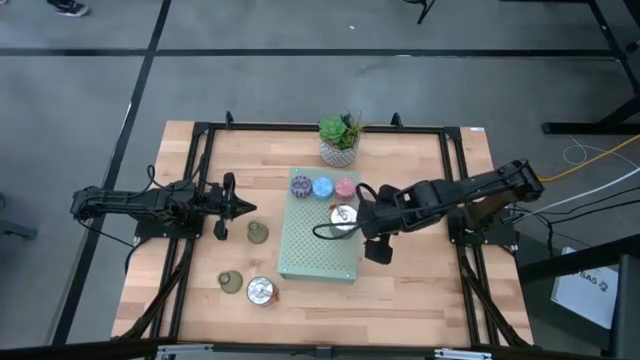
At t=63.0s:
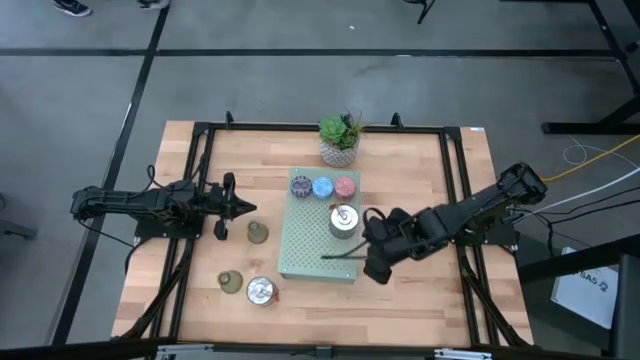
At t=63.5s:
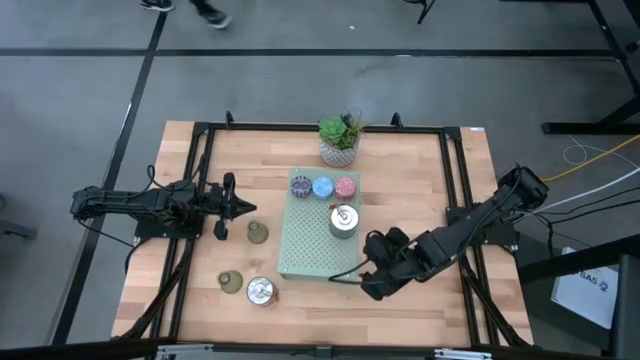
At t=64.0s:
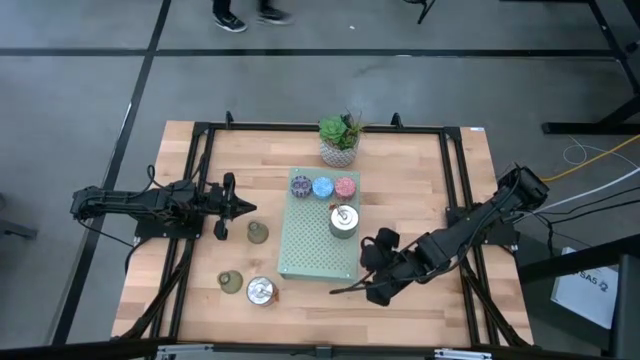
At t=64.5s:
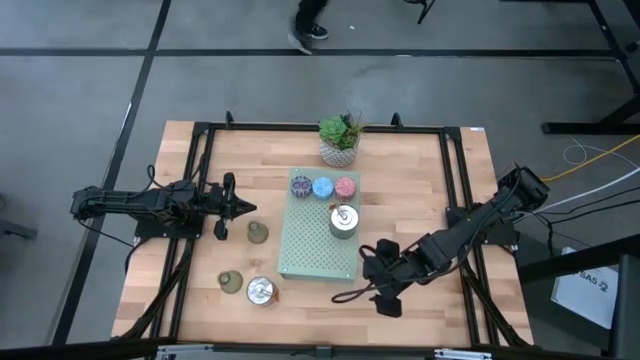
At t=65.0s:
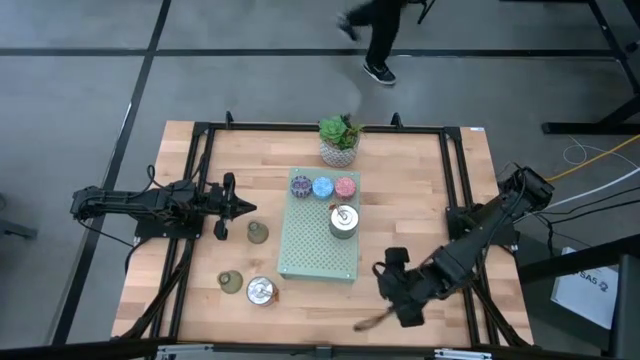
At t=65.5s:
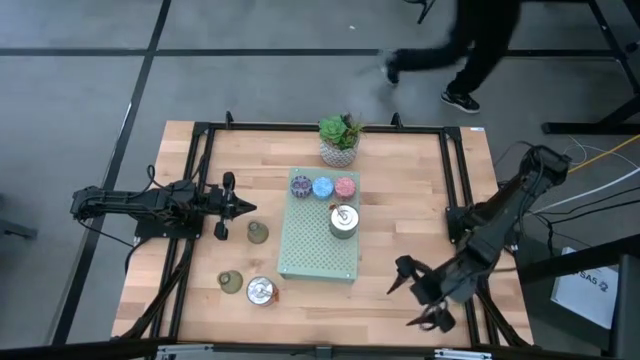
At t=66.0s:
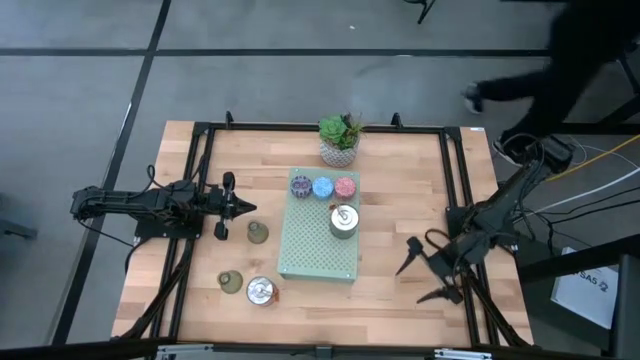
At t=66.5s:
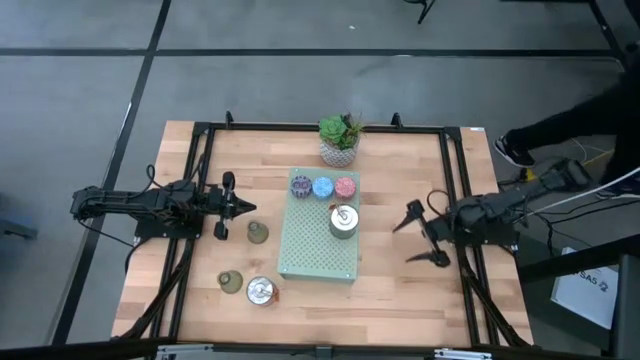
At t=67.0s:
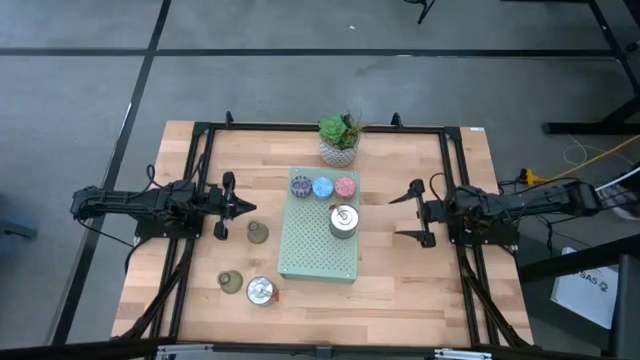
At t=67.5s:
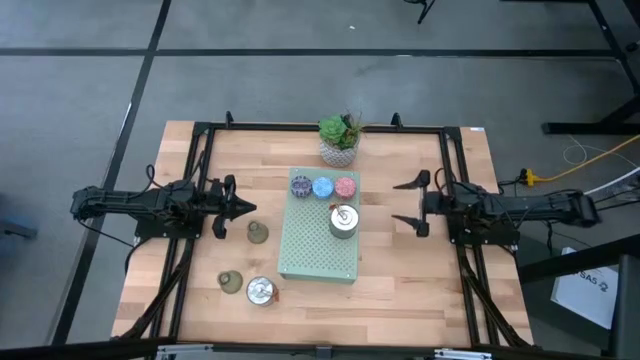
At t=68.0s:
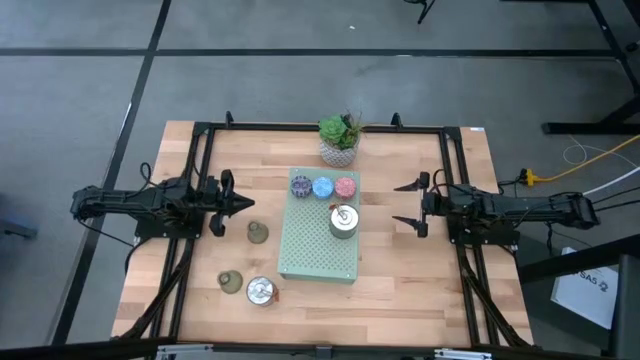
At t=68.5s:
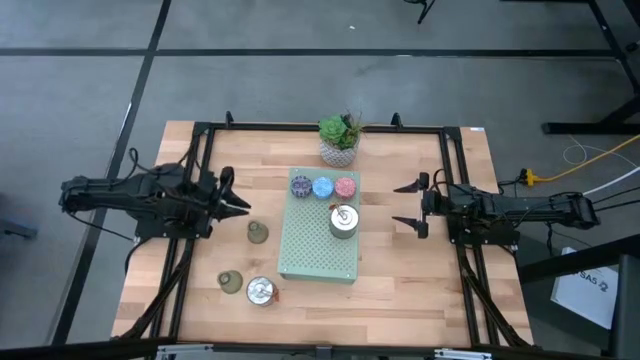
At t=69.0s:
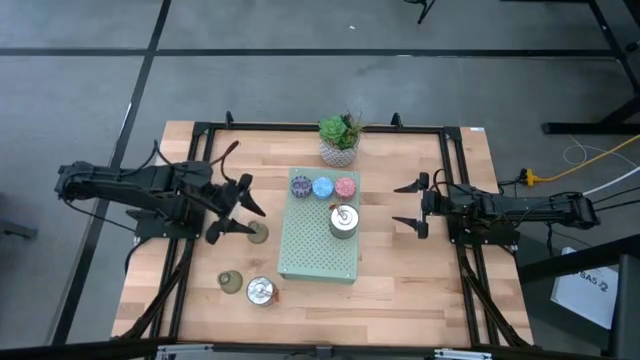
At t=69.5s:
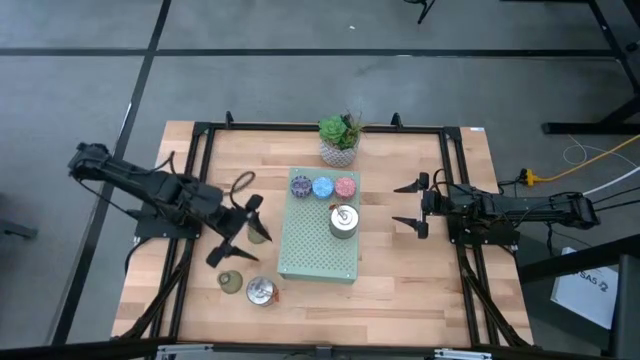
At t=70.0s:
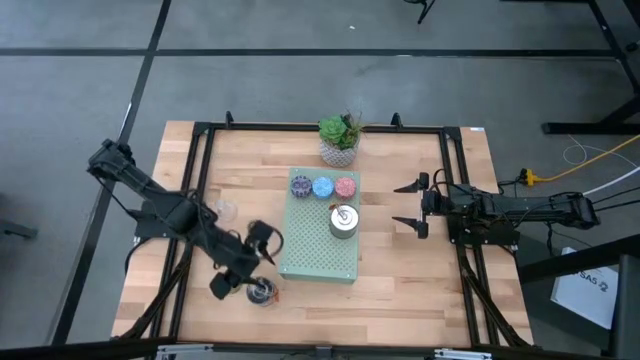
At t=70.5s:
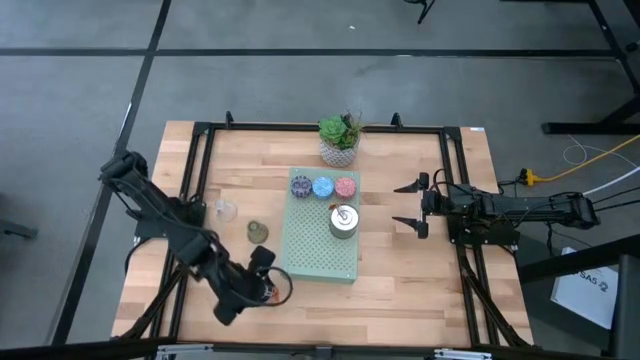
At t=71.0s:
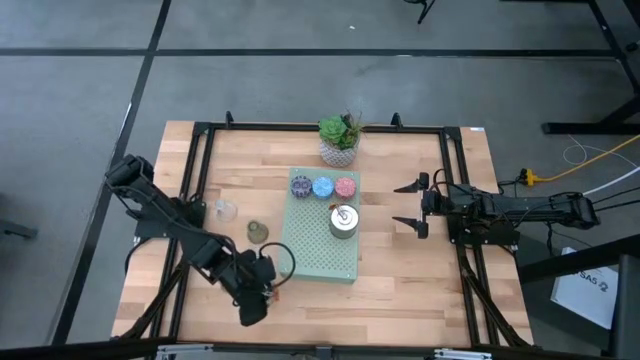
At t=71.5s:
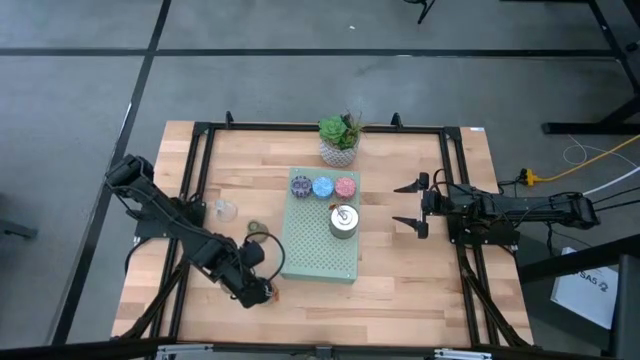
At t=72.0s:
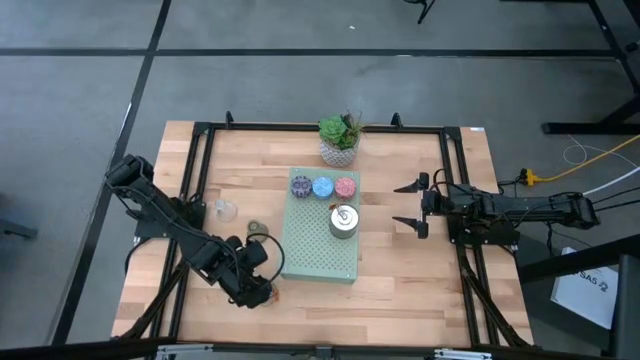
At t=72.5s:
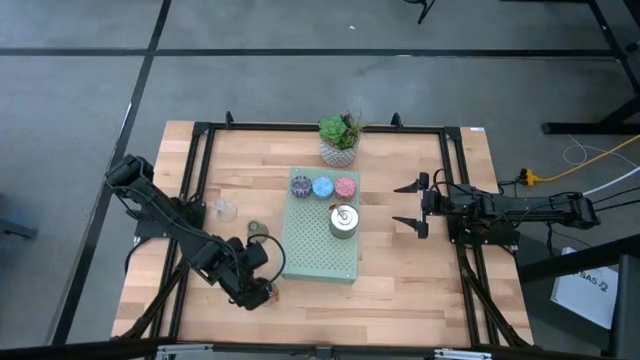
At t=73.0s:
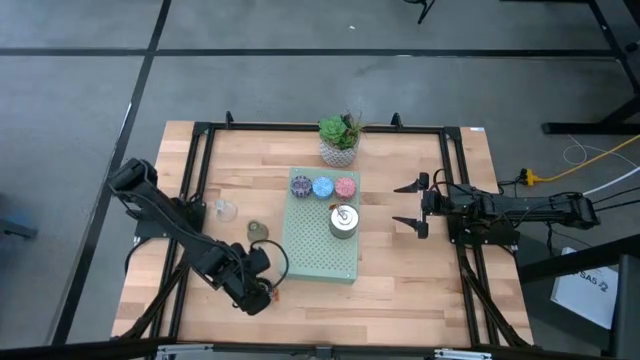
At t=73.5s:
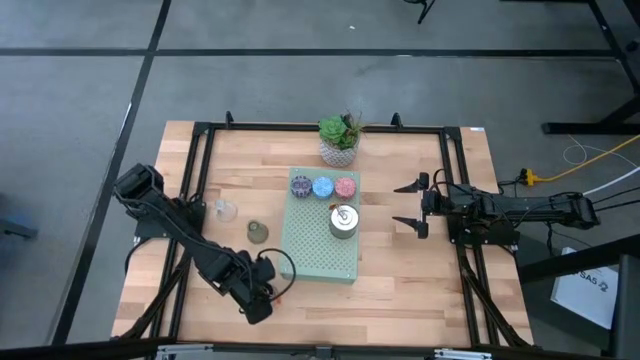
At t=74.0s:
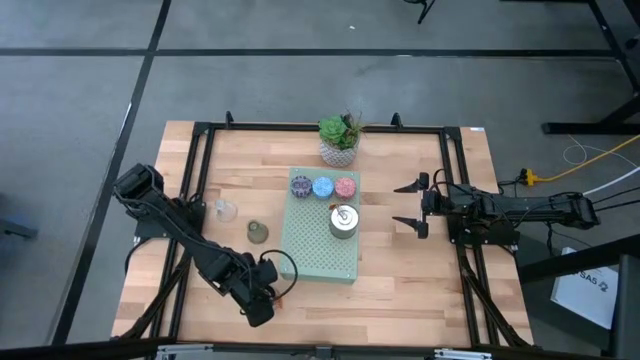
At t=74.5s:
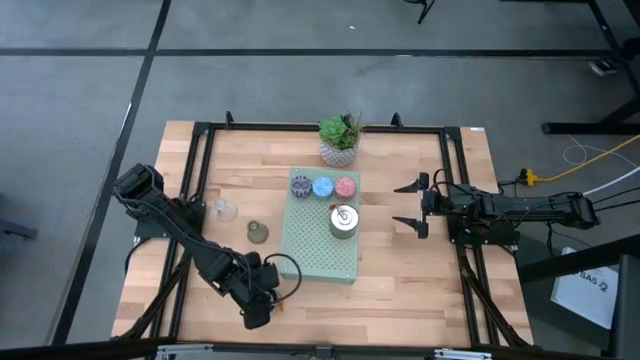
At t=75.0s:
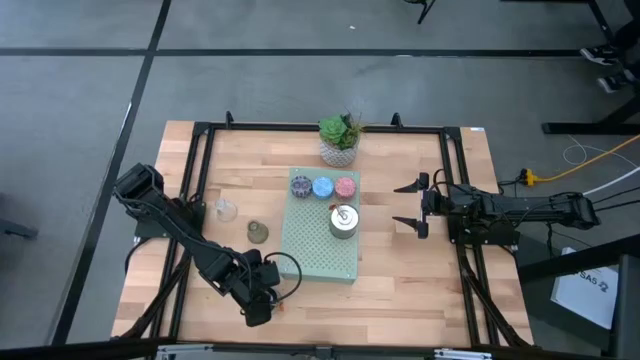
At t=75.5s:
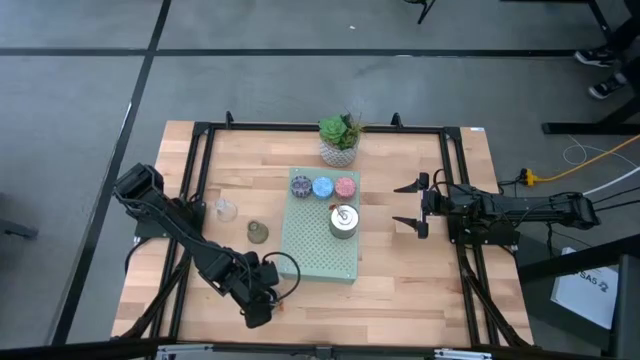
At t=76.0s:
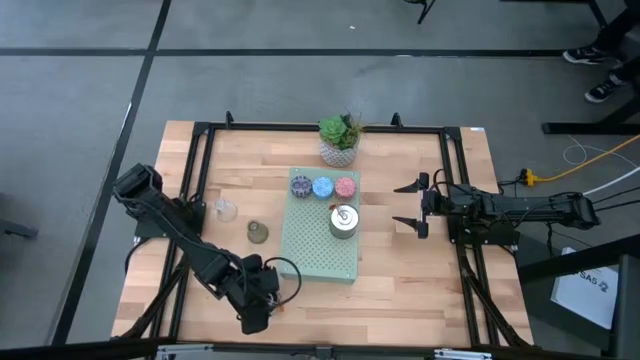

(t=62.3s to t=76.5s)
Task: Pick & Place candle stick holders
Put the silver scented candle on the shelf

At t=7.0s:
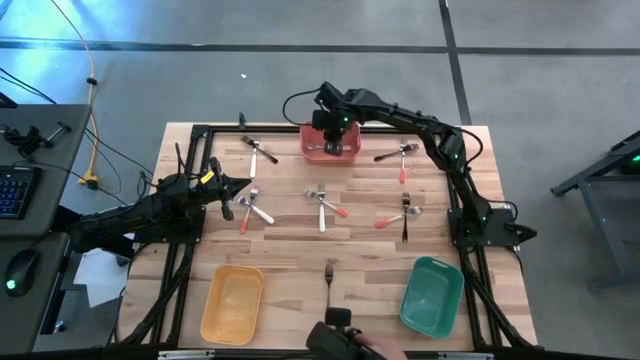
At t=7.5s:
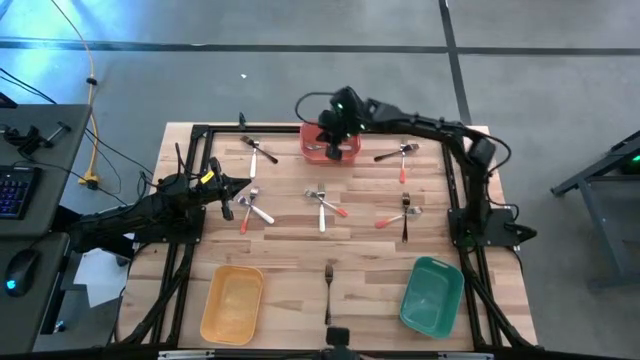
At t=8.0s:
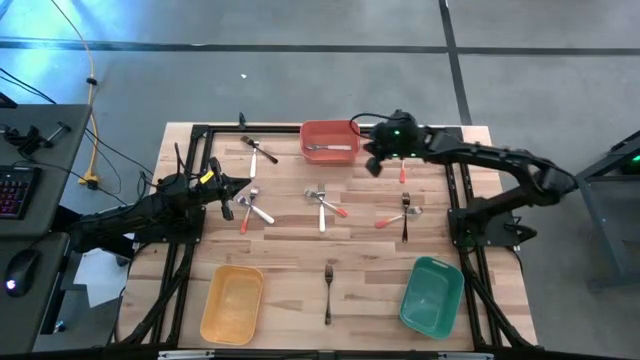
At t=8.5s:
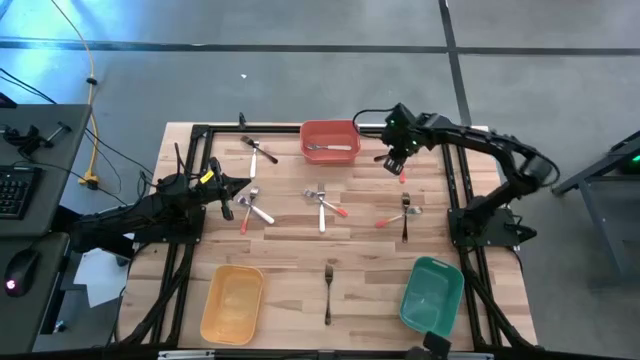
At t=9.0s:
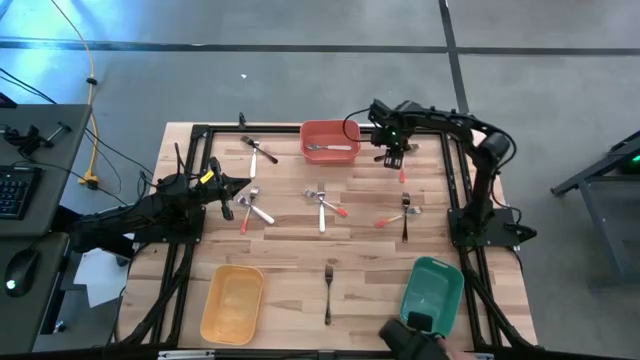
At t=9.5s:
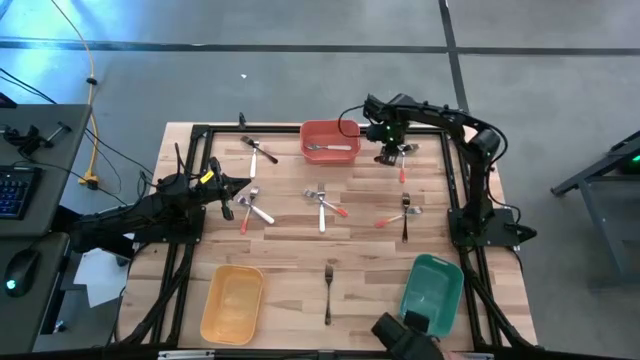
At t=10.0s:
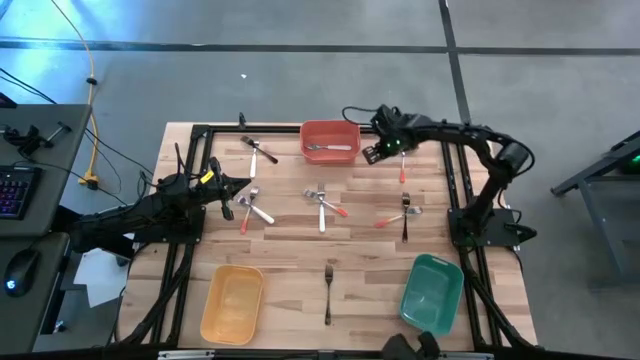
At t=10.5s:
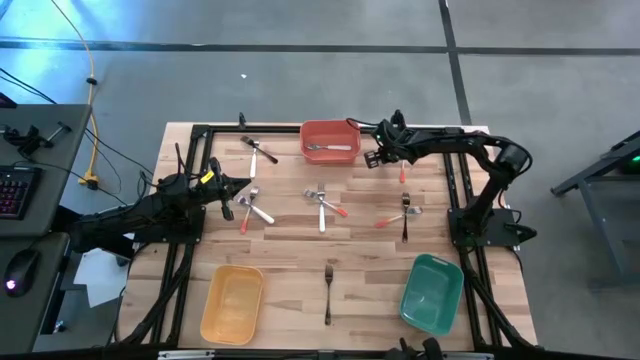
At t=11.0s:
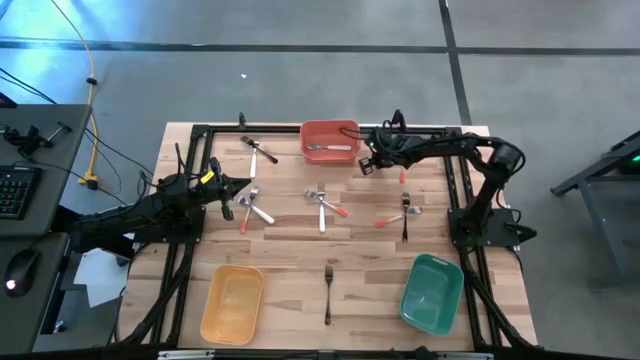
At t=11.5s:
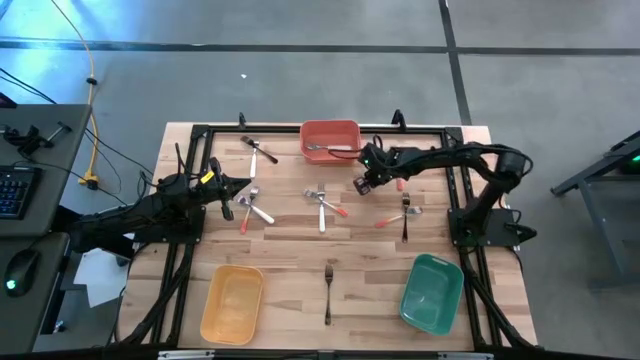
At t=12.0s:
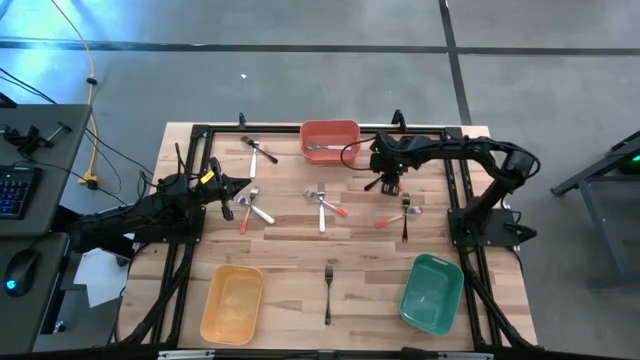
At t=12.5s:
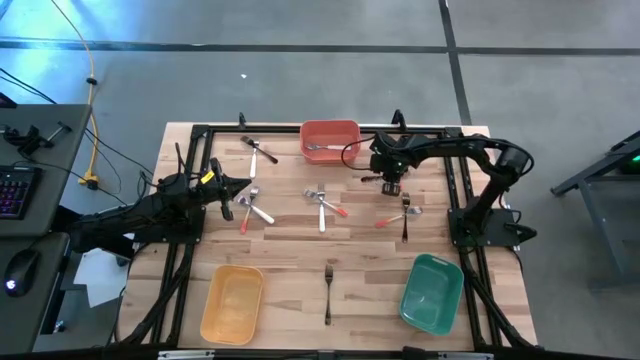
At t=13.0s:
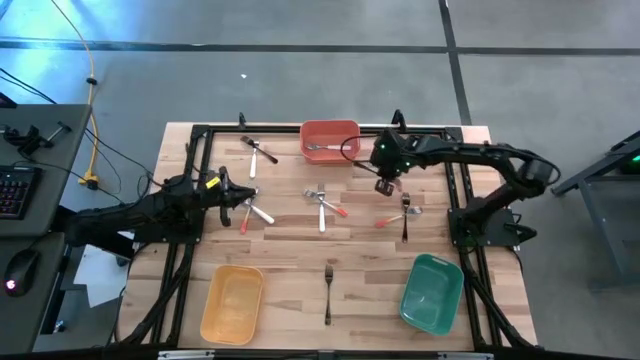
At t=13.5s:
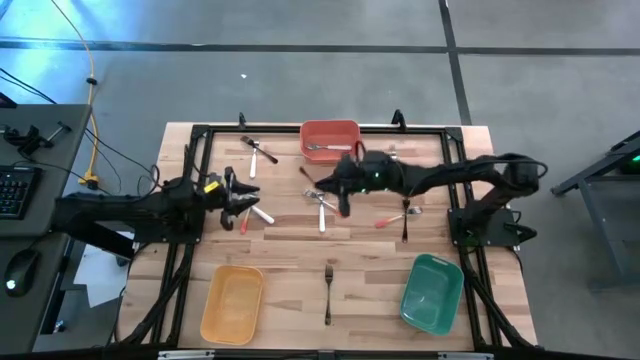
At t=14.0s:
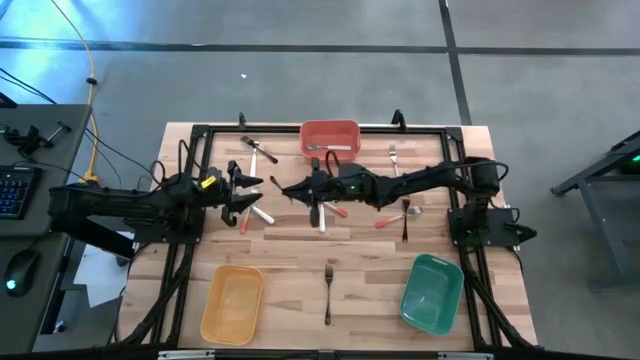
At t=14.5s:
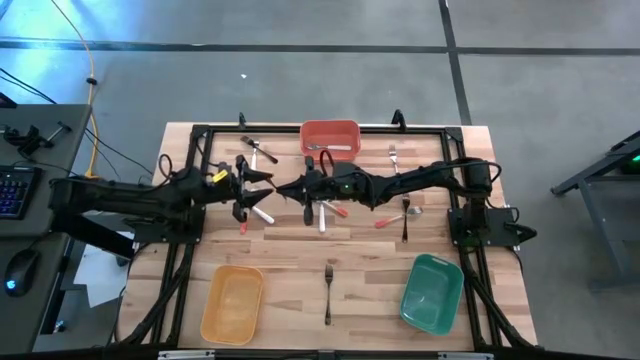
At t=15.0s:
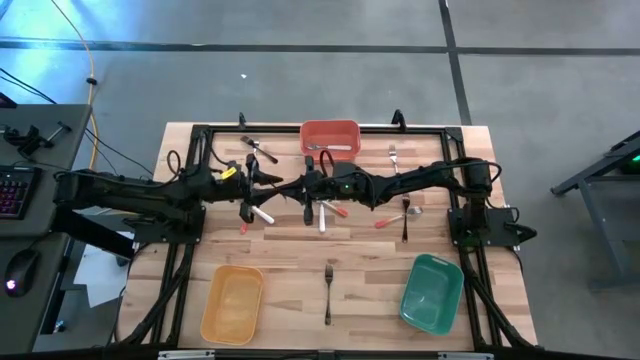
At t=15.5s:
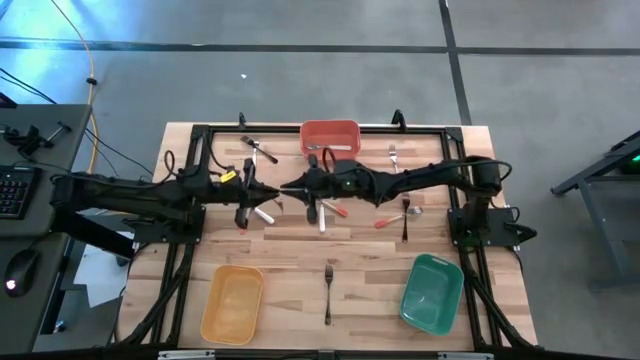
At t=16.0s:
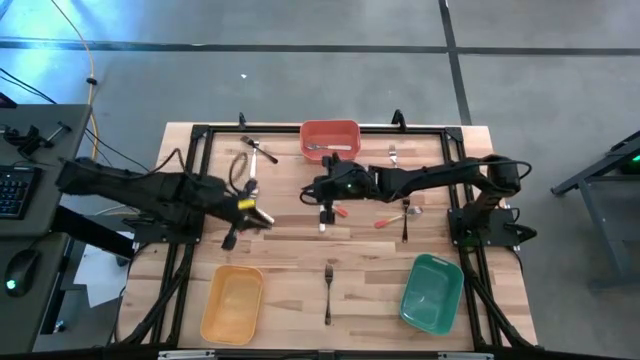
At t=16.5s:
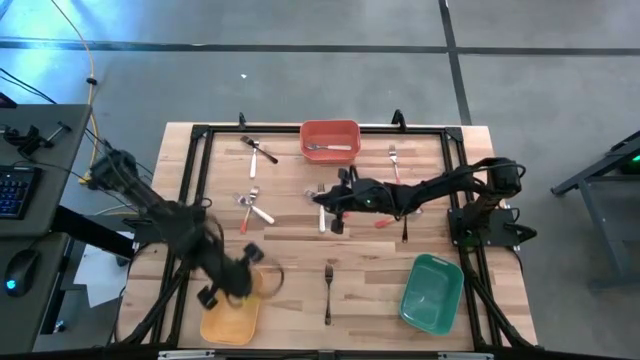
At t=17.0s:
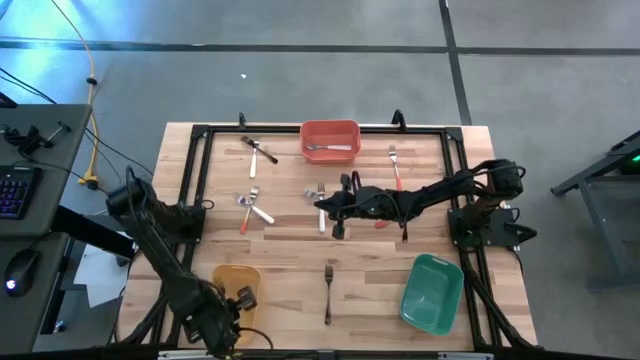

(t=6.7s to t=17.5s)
Task: Sort silverware by color (type)
Put the top right black fork into the yellow bin
